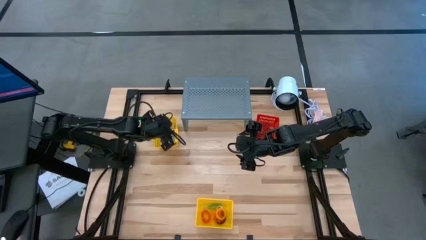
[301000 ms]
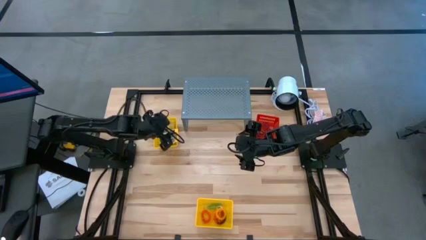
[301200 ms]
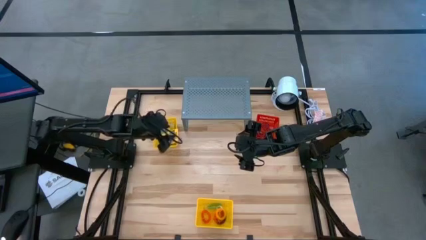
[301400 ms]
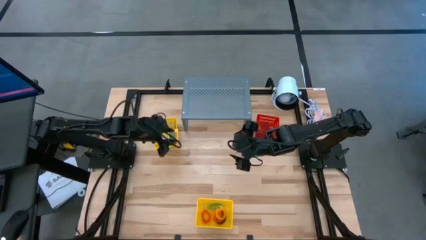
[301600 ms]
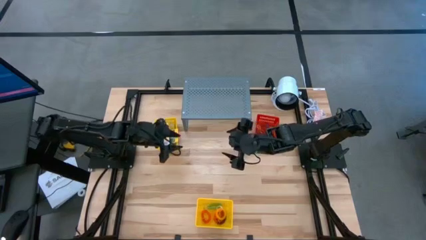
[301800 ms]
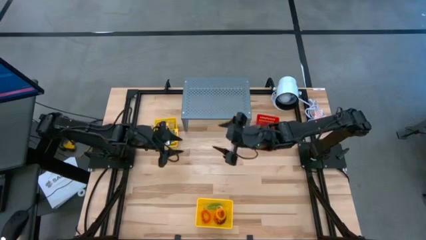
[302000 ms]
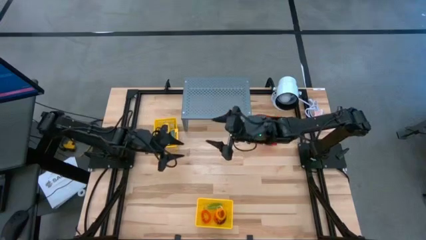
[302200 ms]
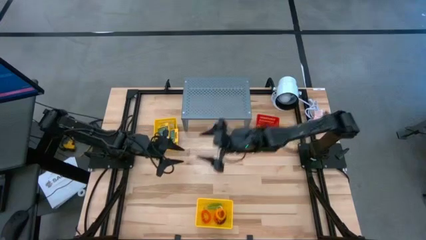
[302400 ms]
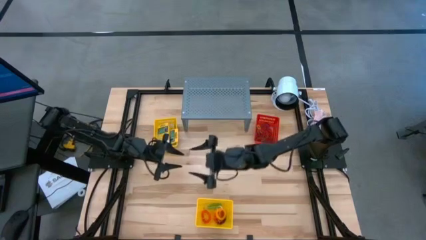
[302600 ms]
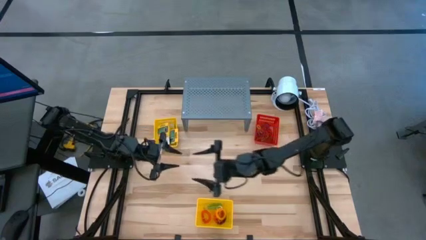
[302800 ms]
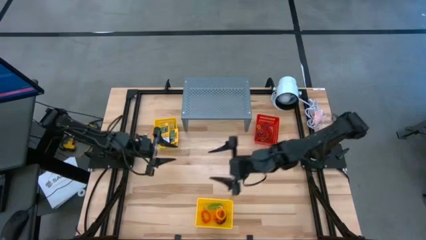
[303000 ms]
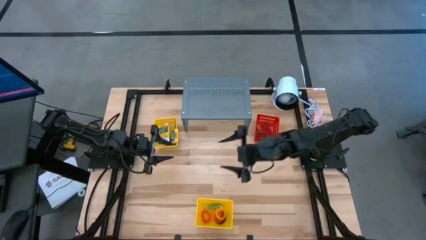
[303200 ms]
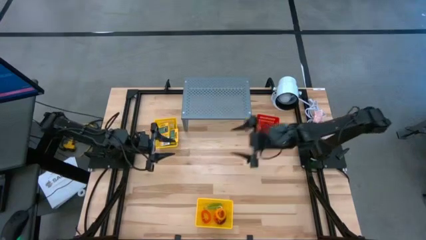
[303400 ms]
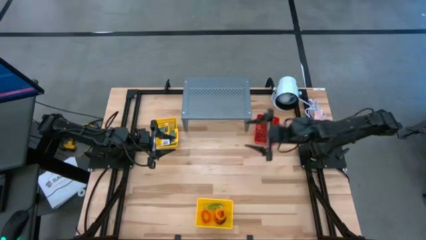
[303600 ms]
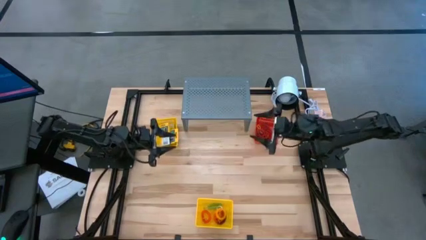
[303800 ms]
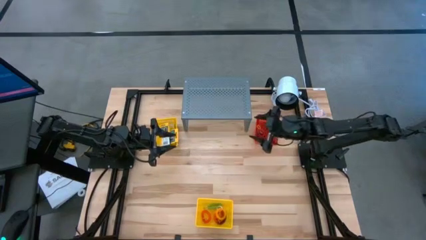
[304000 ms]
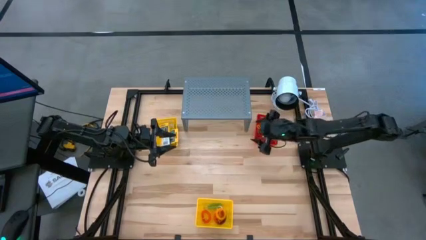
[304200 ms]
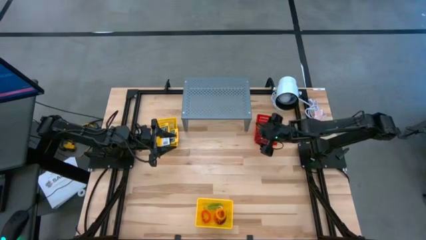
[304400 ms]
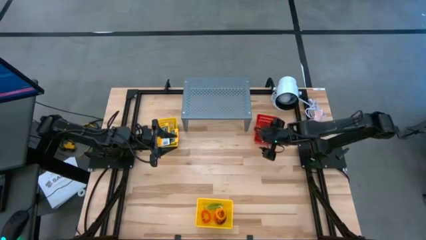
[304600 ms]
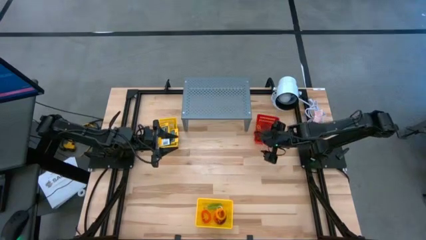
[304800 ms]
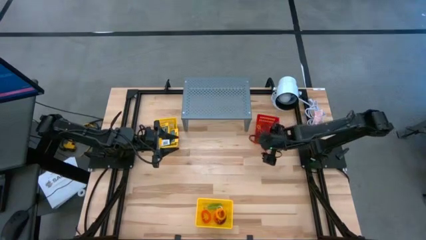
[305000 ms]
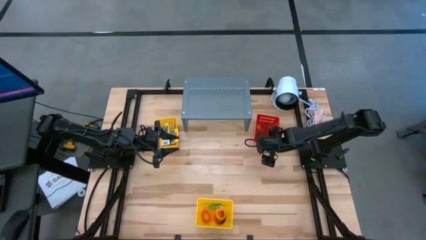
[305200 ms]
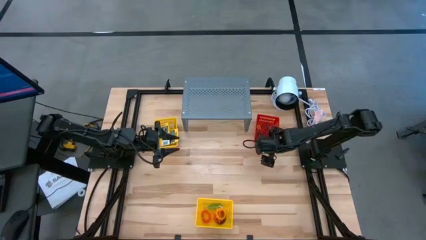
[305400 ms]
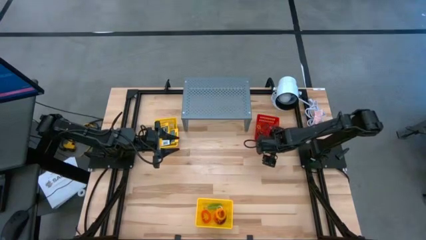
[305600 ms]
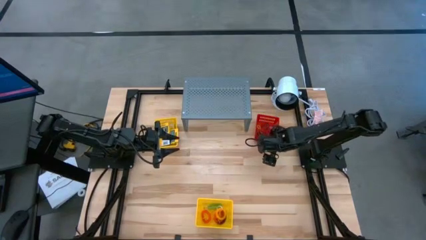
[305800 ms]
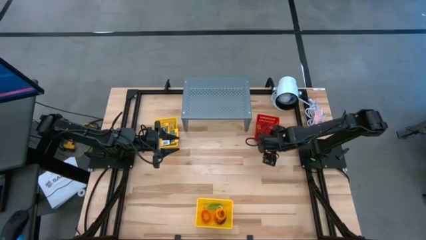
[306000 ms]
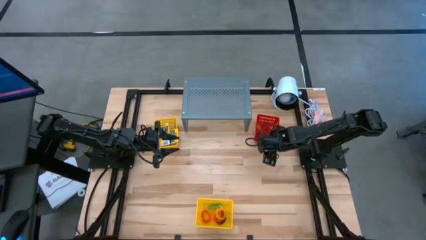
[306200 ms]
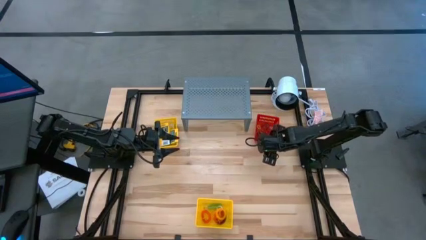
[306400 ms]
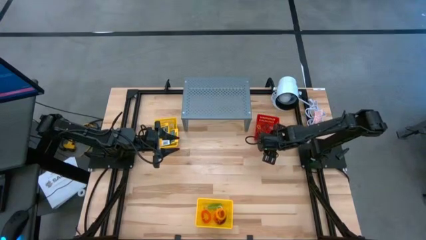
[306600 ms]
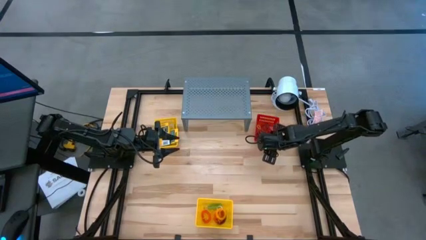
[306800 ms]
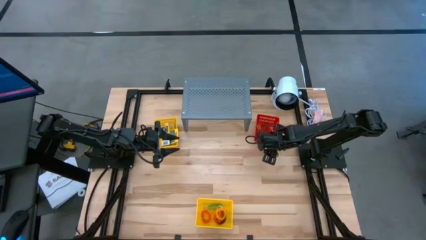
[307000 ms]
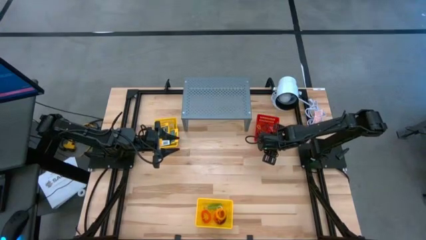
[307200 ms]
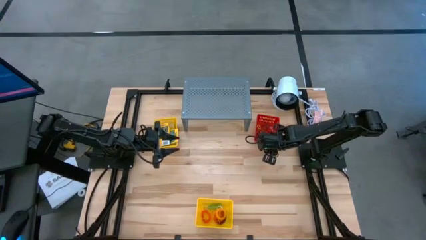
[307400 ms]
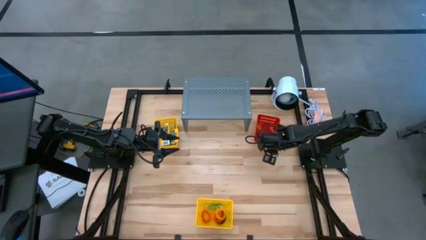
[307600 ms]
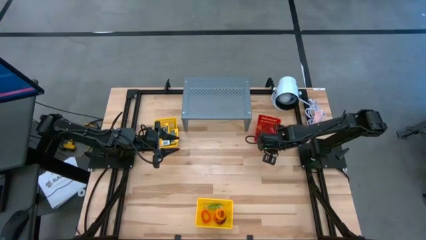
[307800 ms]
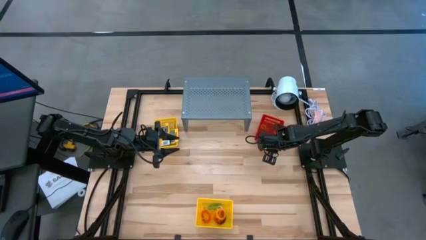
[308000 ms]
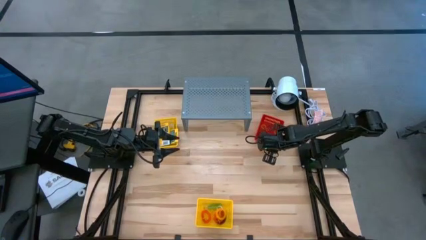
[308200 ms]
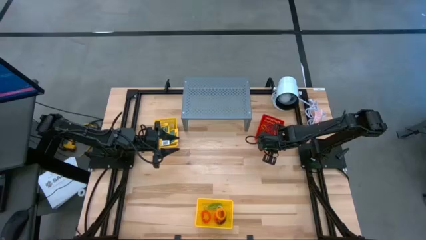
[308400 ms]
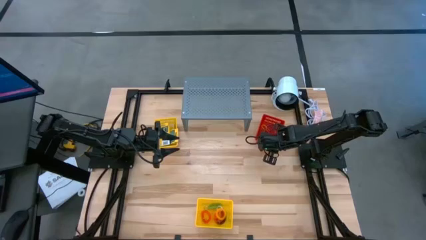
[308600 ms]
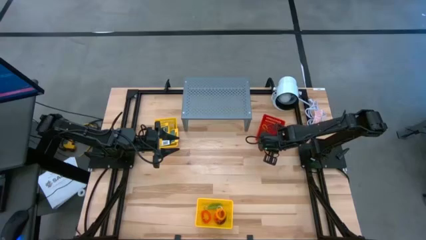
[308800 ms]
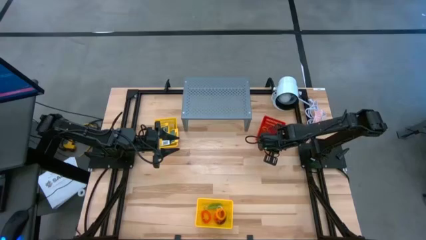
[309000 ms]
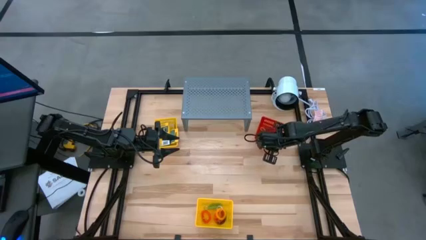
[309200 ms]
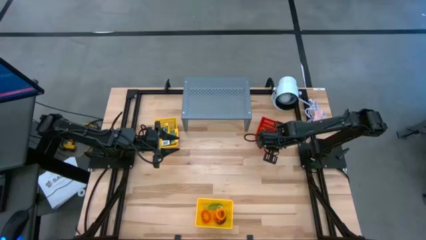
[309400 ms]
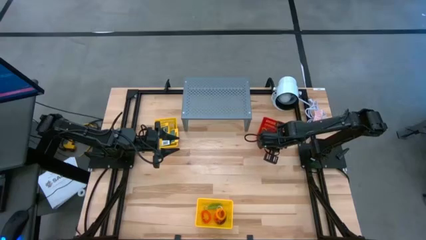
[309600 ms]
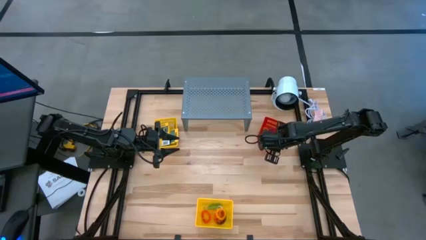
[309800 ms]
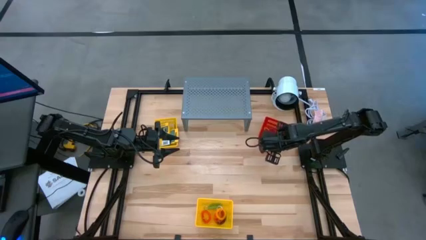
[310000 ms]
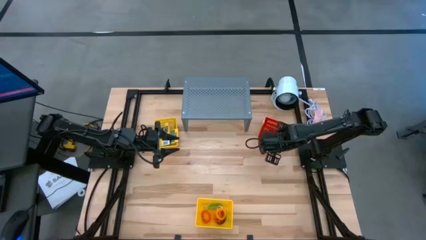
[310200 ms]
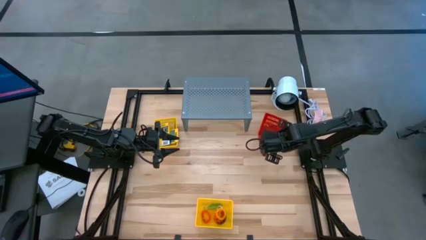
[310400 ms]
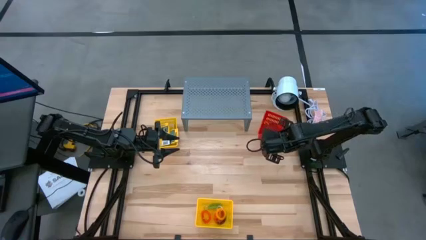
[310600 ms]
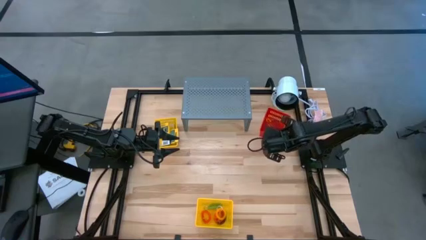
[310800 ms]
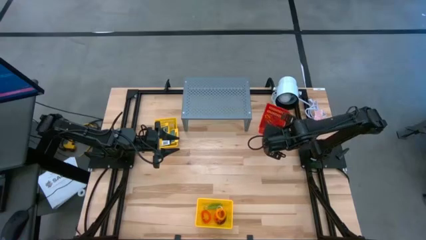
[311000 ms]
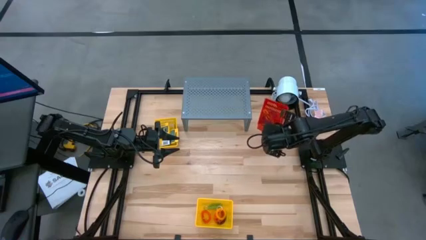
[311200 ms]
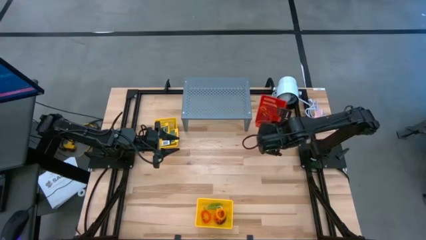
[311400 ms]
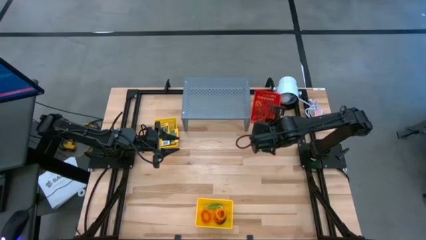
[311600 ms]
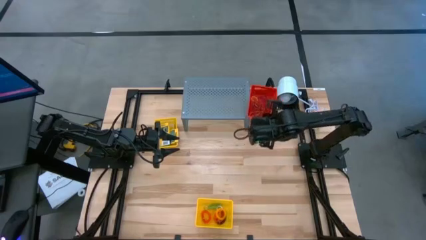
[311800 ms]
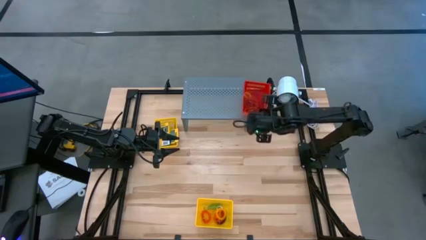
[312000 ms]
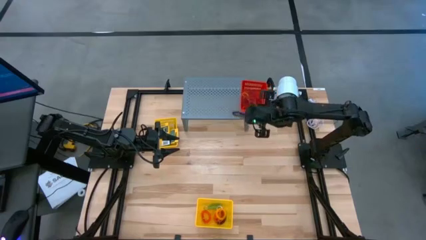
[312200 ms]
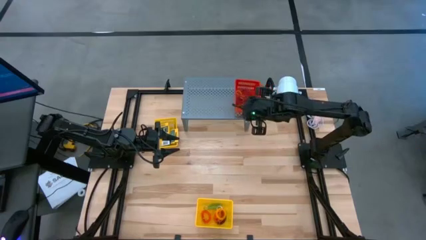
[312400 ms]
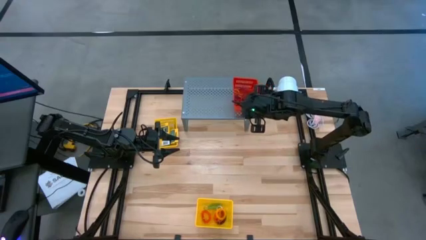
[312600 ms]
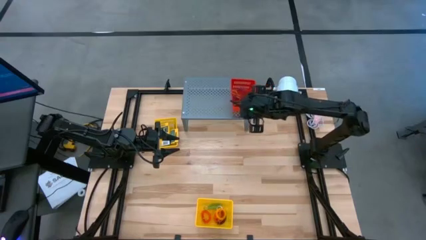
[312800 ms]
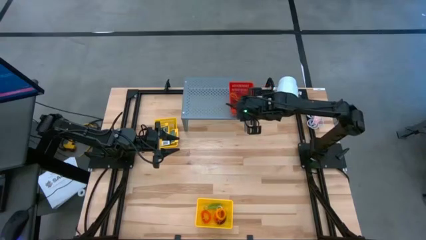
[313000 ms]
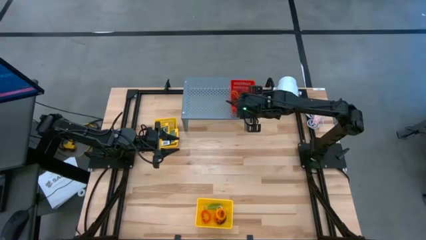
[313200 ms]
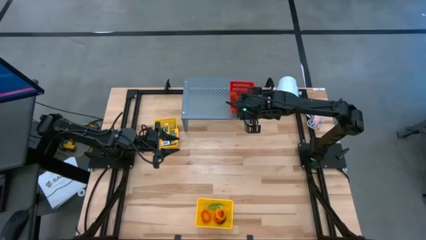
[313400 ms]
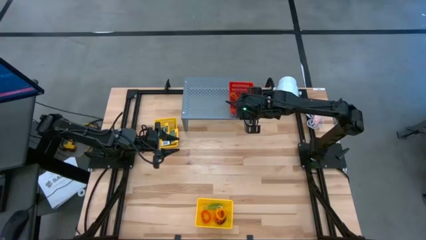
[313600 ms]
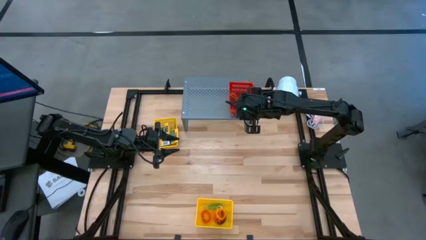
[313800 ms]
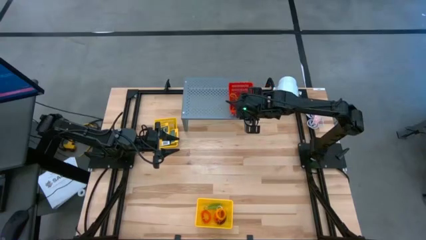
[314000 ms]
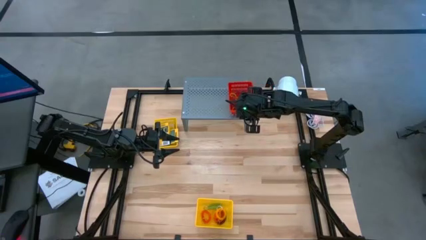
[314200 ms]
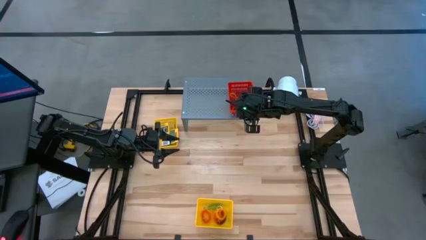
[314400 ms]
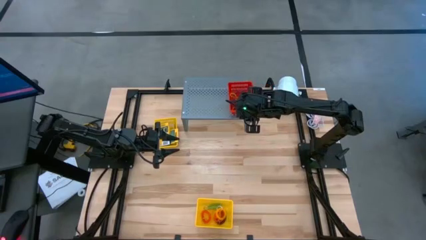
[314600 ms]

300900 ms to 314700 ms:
Task: Pick & Place Office Desk Supplies
Put the red bin filled with rubber bands on the shelf

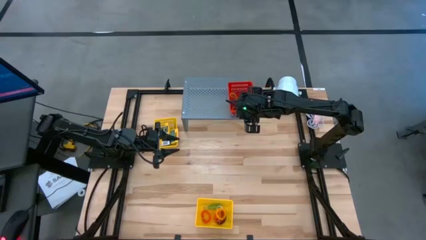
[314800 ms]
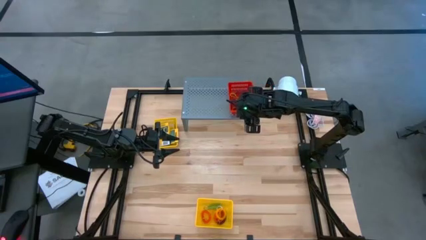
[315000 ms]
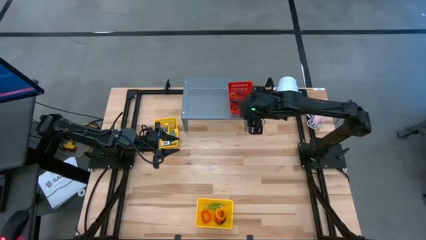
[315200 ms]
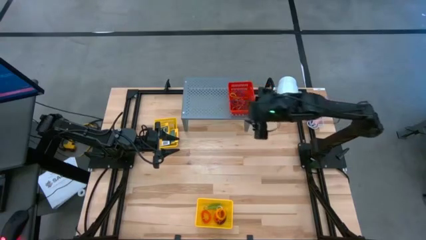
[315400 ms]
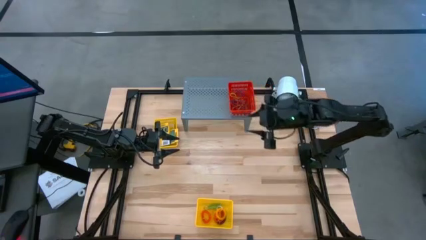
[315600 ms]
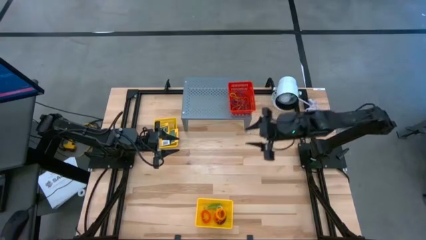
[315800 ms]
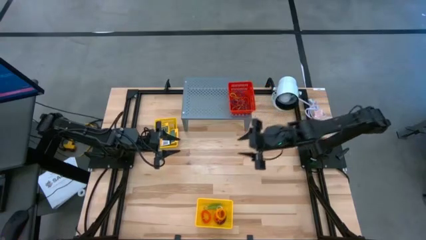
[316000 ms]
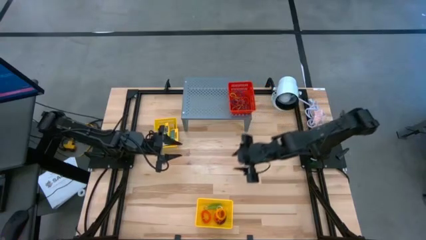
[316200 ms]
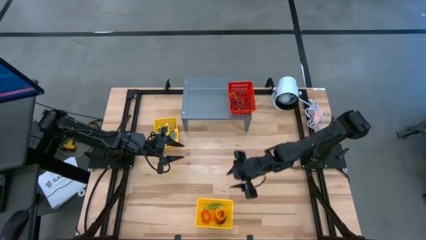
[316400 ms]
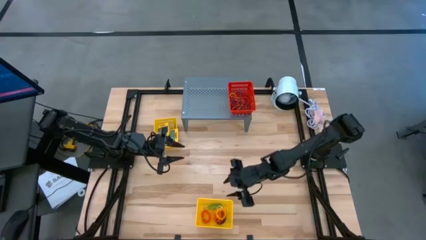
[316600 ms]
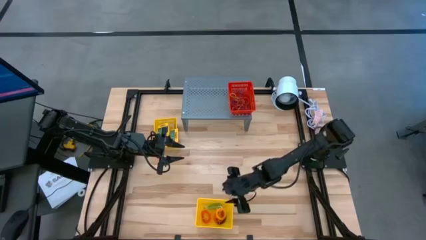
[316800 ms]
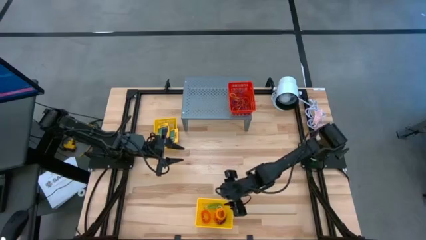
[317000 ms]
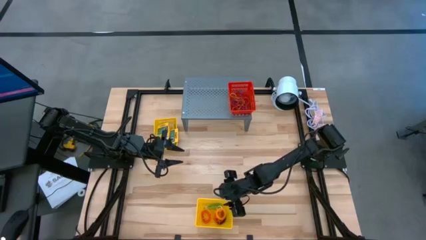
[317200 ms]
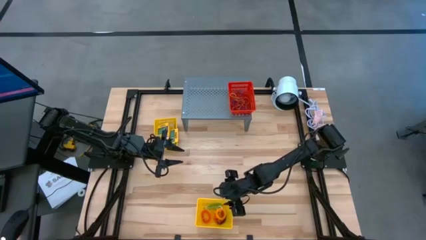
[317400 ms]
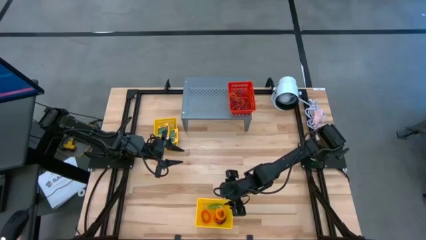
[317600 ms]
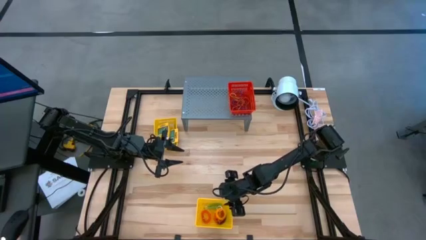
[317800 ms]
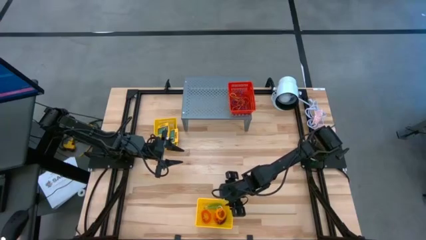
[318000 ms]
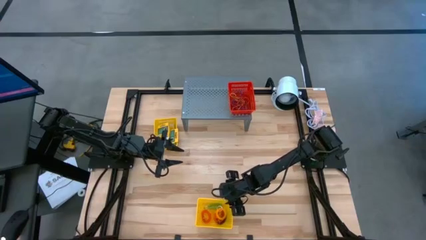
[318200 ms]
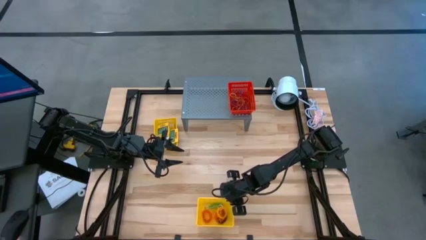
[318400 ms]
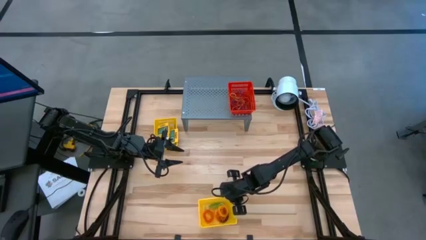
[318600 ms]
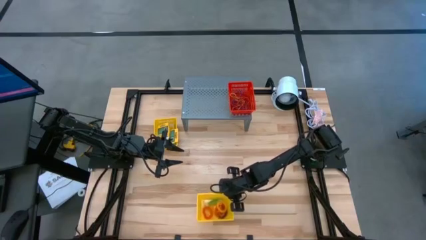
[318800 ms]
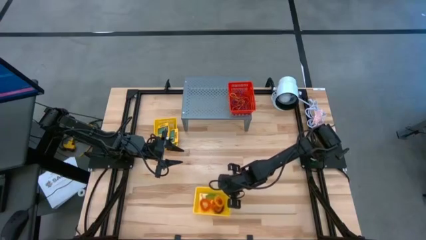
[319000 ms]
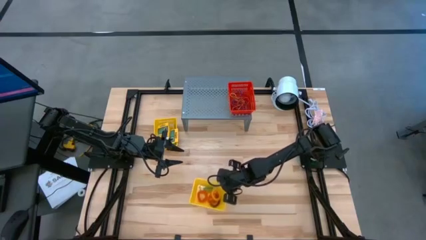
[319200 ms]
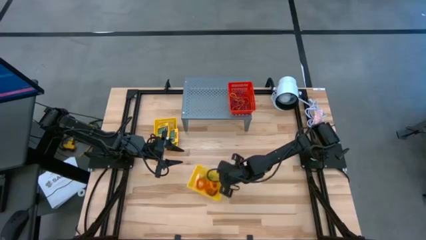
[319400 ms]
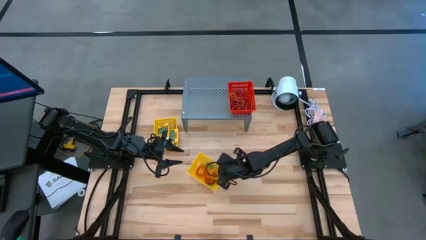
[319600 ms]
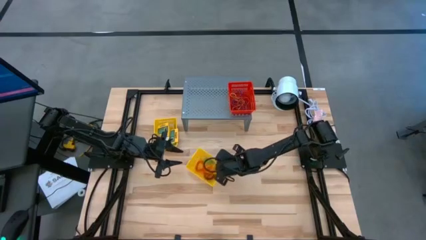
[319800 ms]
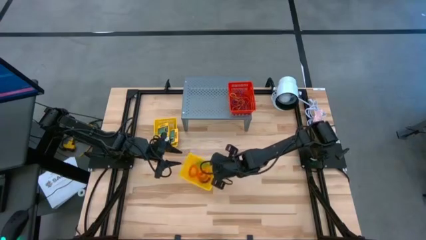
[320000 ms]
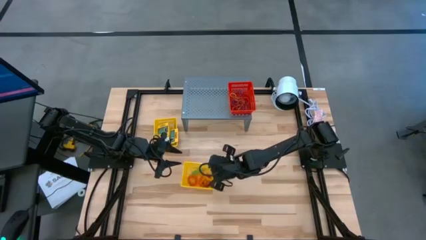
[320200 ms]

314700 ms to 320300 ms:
Put the bottom yellow bin filled with spiral keychains on the shelf
